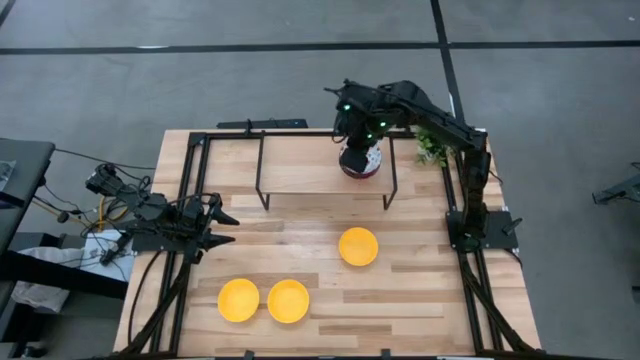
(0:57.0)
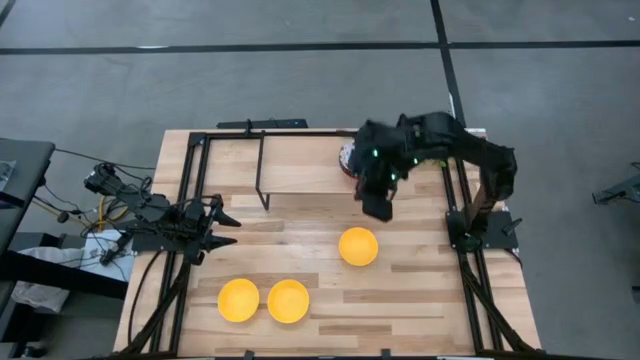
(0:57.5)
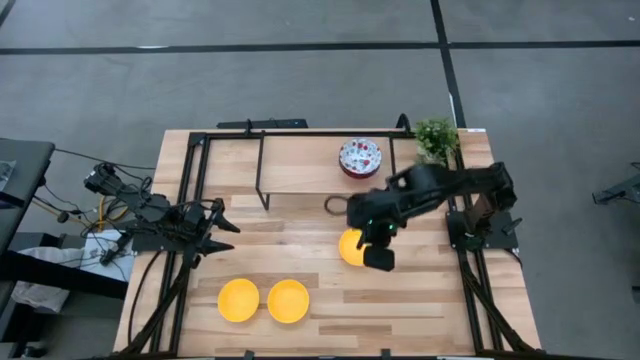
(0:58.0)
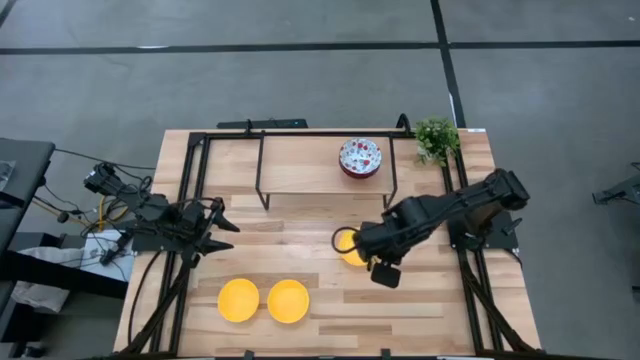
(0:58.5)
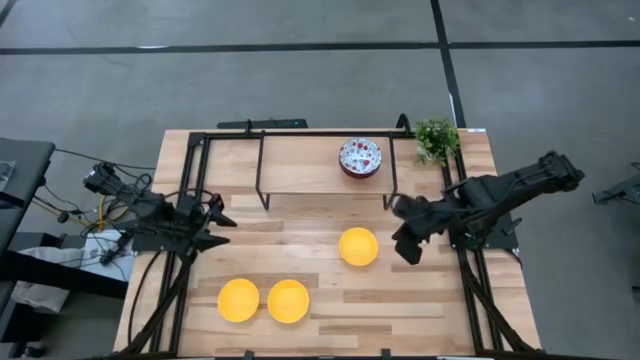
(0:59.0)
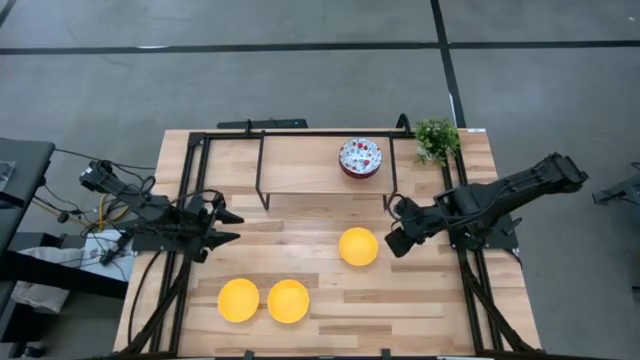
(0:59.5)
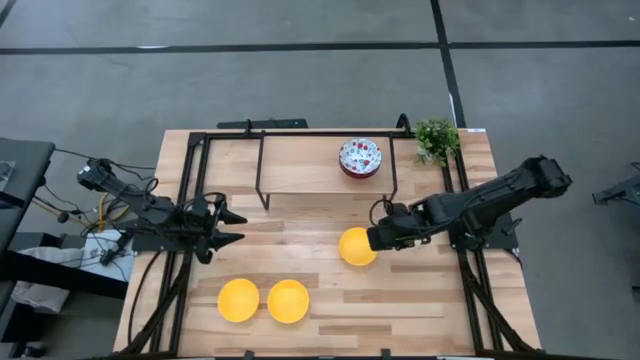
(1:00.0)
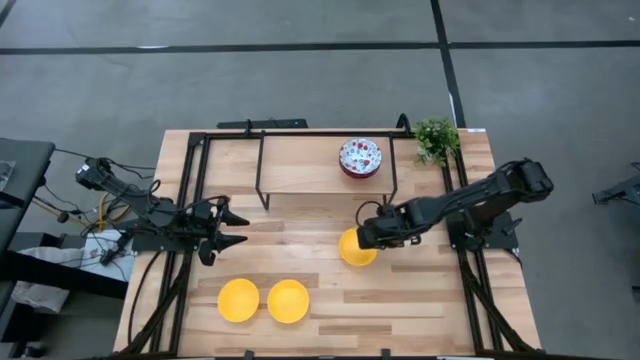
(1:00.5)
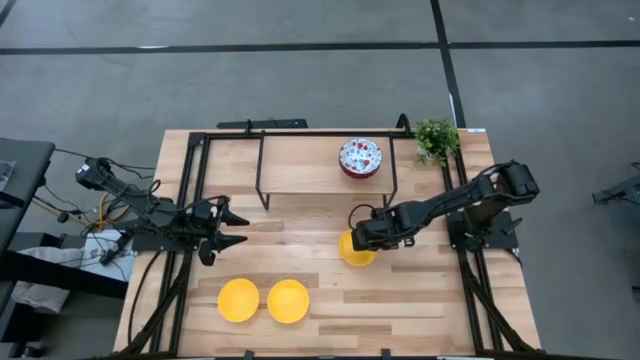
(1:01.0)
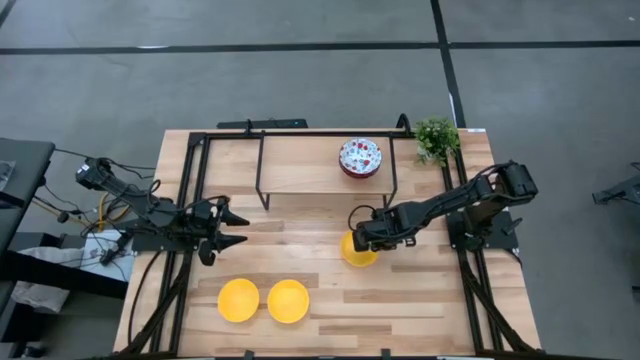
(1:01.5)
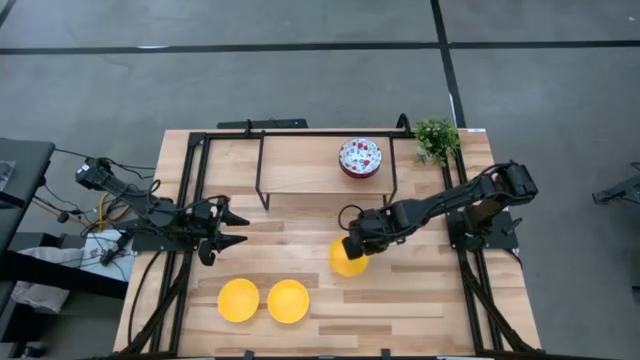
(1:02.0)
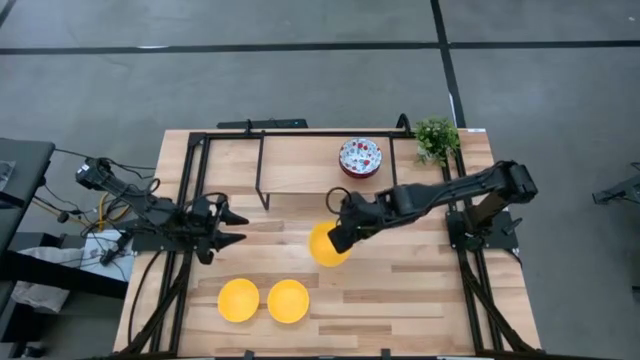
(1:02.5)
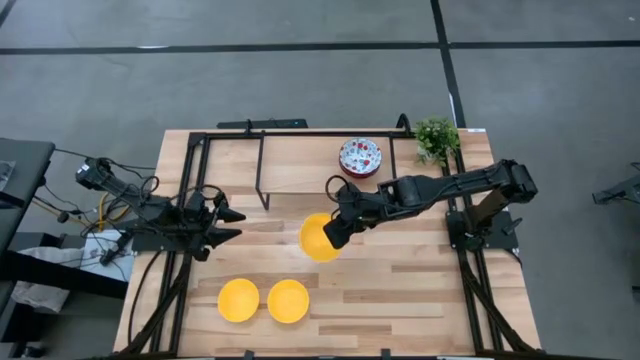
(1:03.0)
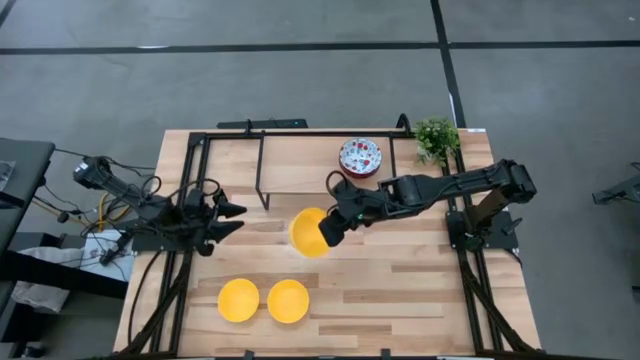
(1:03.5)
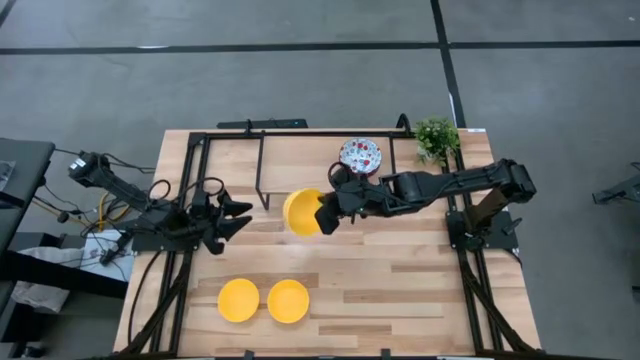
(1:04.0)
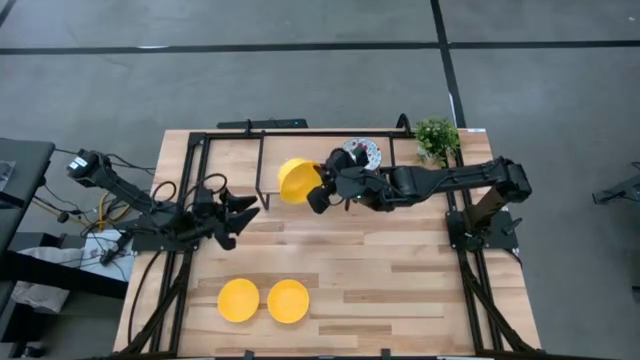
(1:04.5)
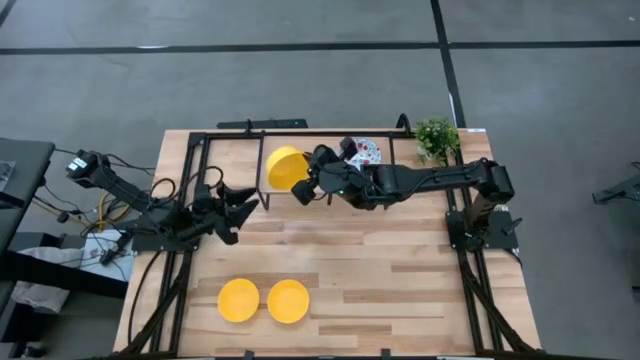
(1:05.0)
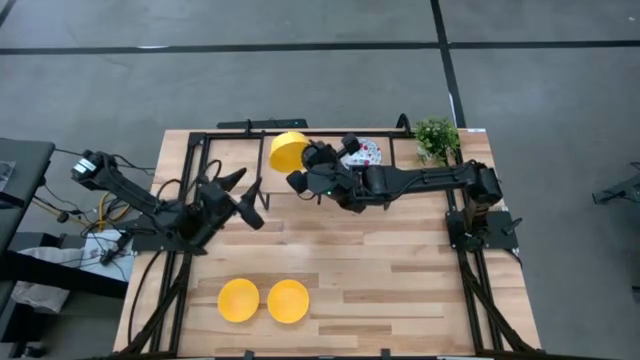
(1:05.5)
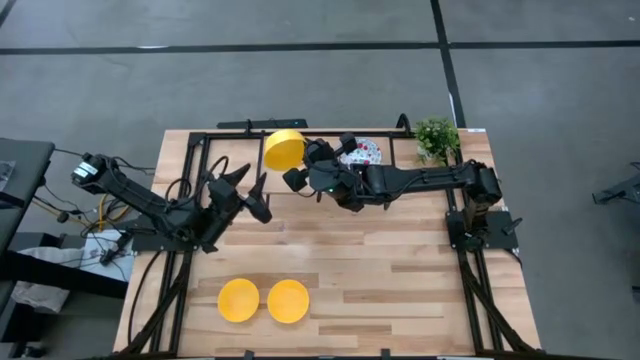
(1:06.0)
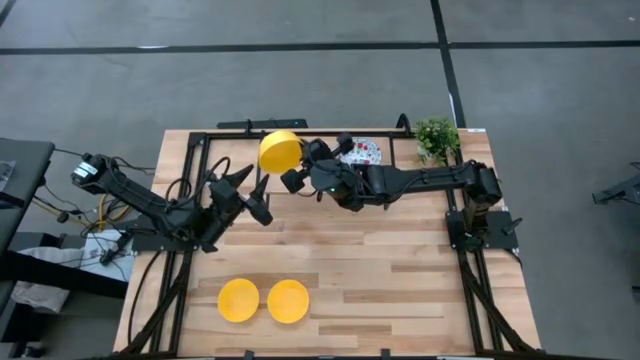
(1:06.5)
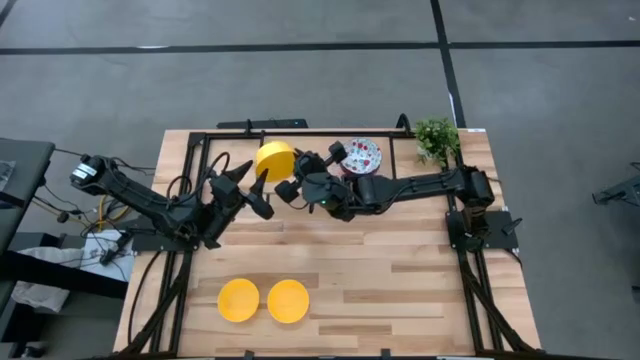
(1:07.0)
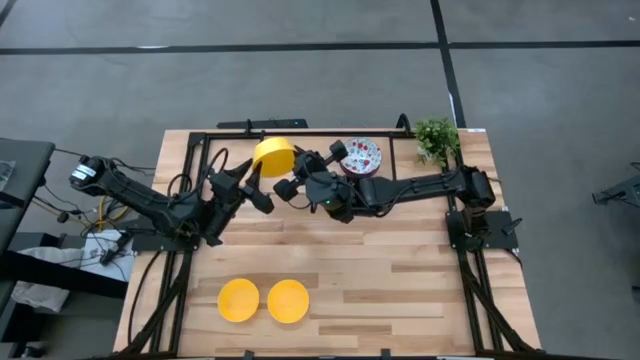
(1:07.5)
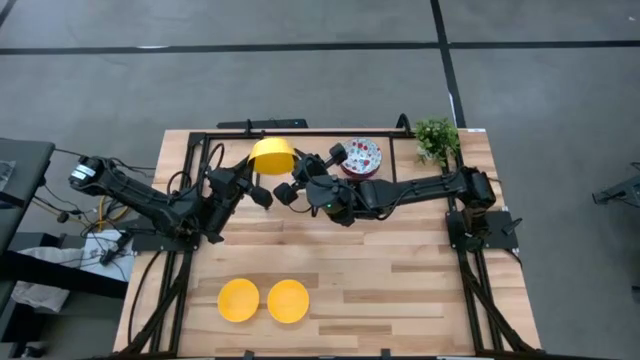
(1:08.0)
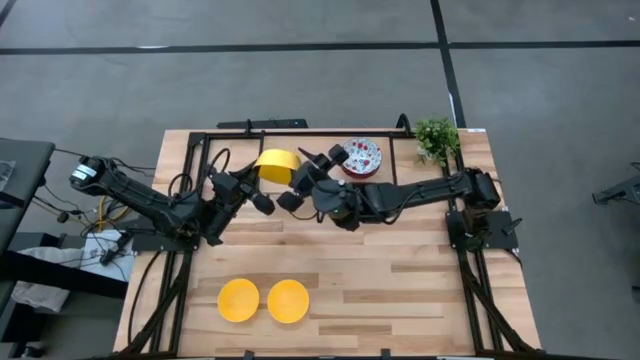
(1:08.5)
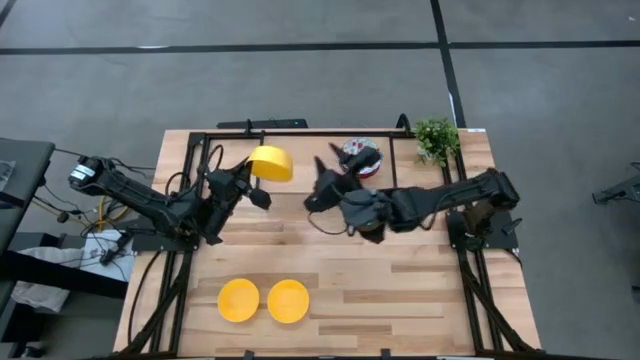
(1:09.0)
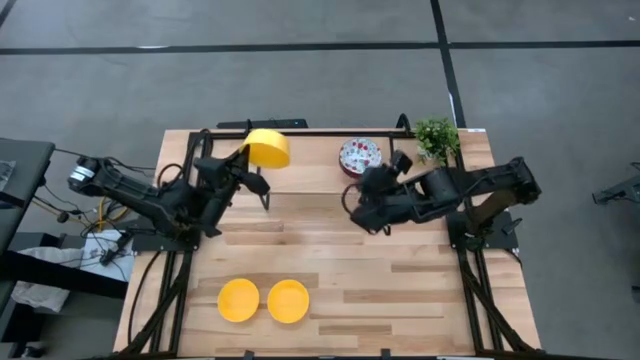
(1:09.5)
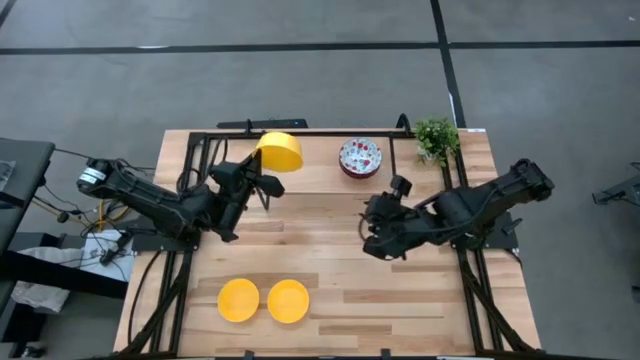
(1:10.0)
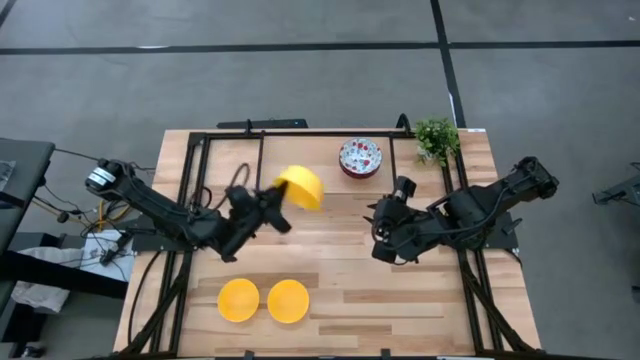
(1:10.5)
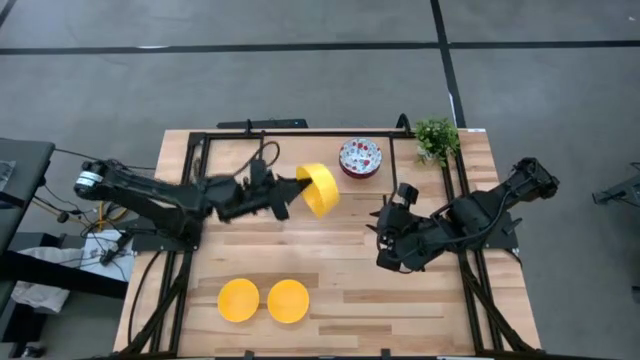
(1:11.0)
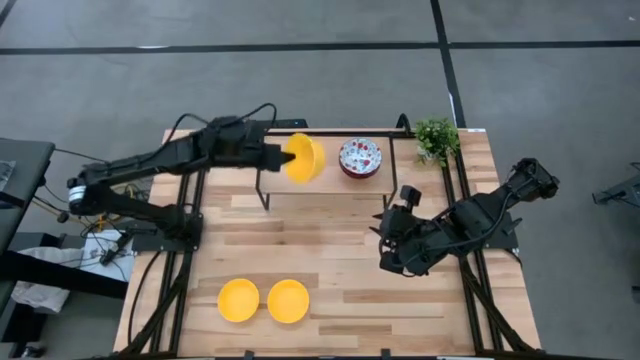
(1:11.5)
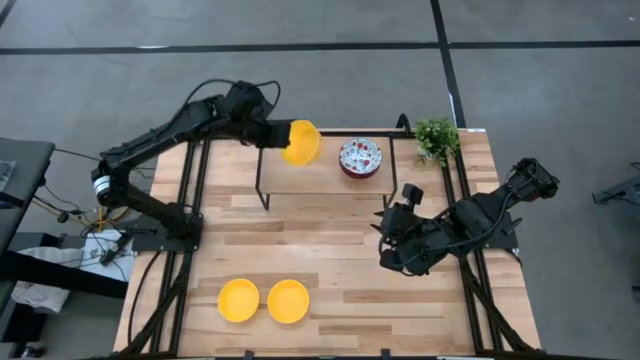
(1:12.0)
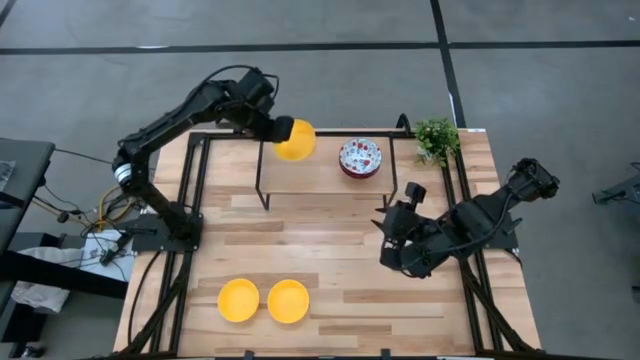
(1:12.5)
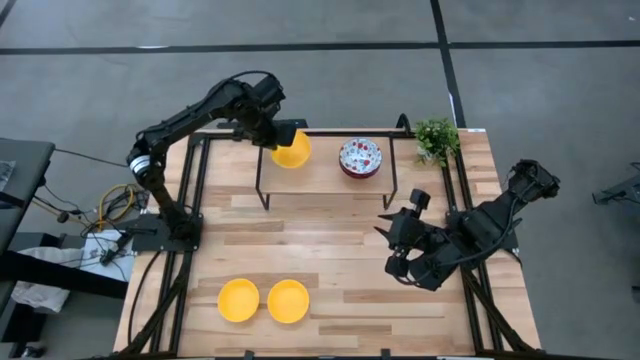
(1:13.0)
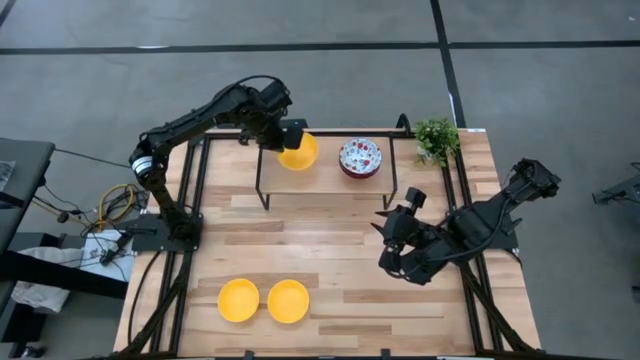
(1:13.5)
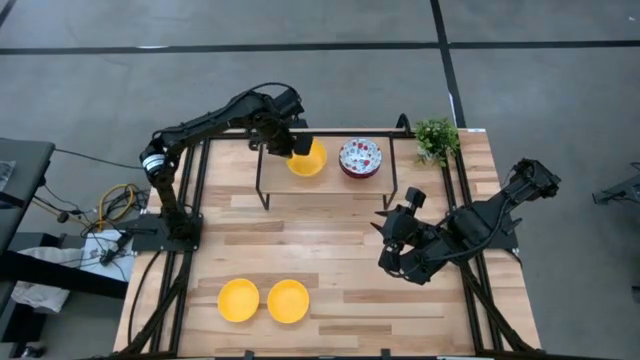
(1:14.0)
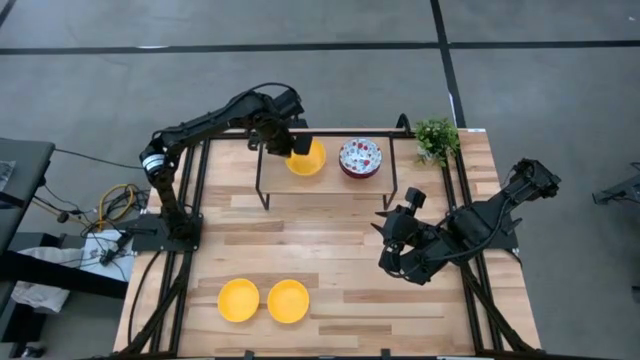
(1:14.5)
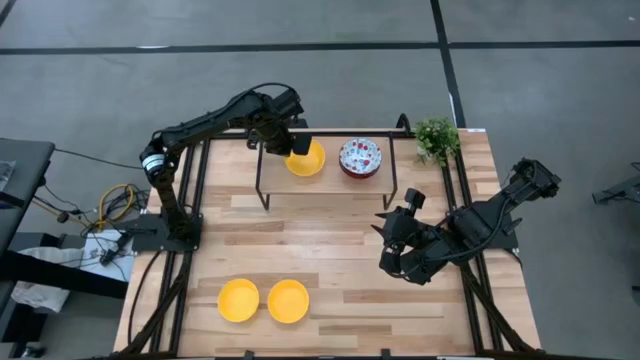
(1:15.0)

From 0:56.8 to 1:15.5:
Task: Pick & Place Mini bowls
Put the top yellow bowl on the shelf
